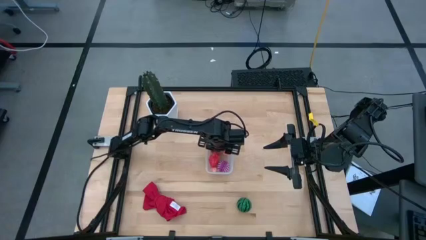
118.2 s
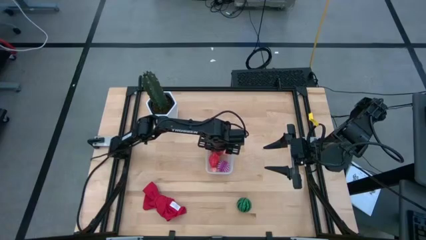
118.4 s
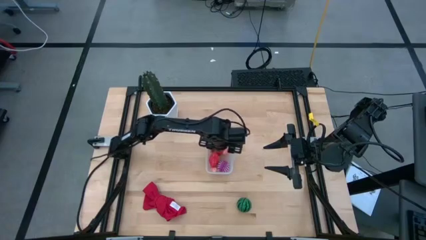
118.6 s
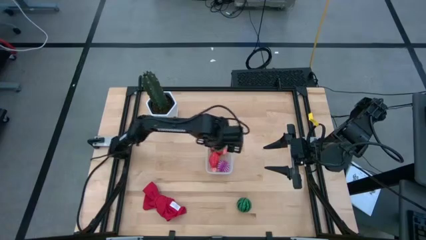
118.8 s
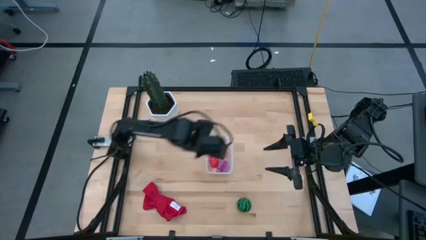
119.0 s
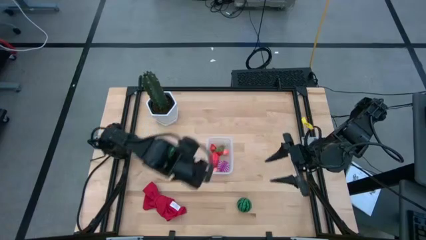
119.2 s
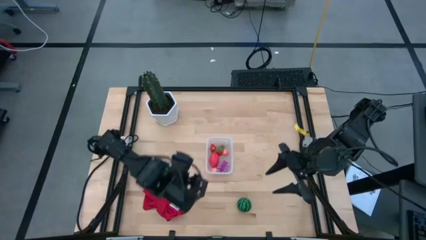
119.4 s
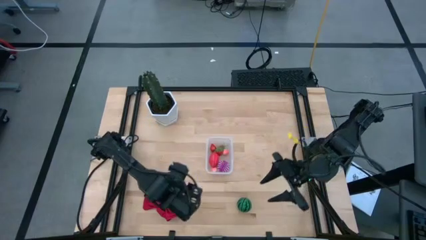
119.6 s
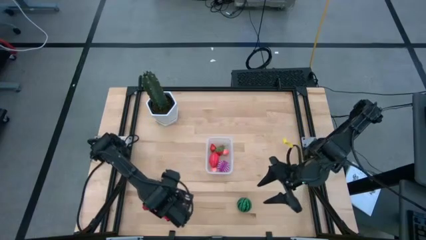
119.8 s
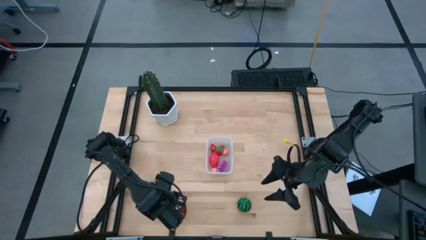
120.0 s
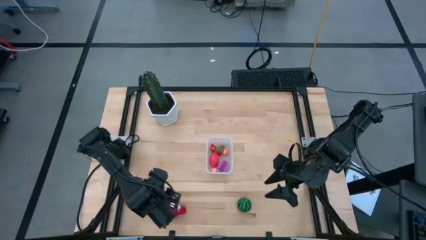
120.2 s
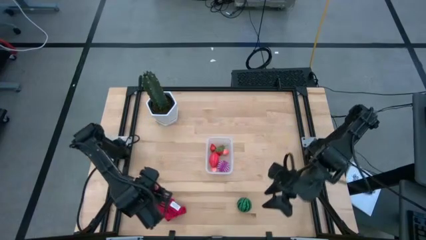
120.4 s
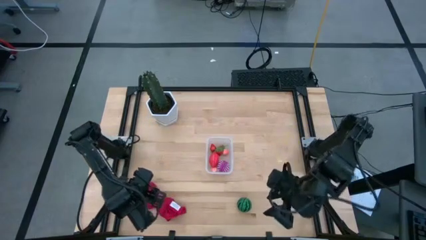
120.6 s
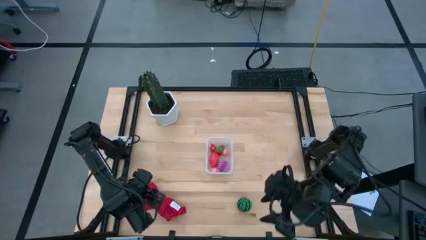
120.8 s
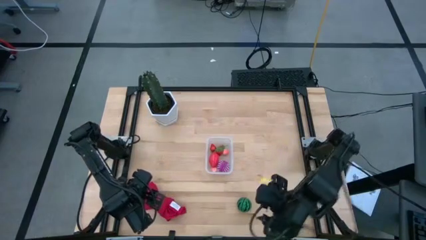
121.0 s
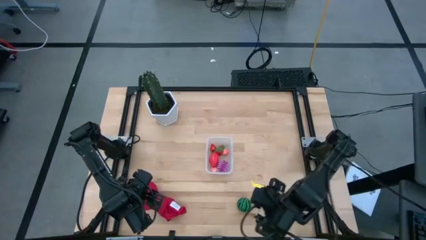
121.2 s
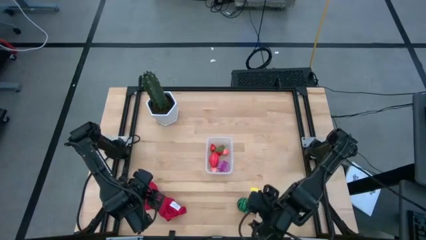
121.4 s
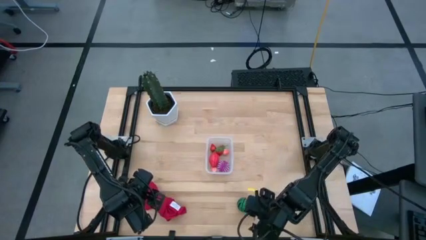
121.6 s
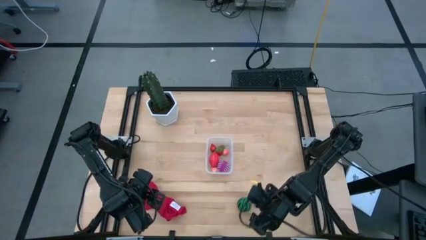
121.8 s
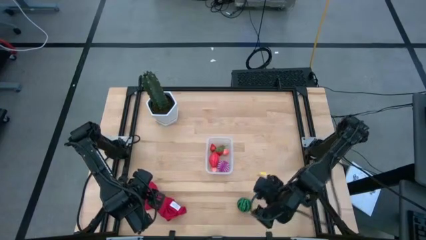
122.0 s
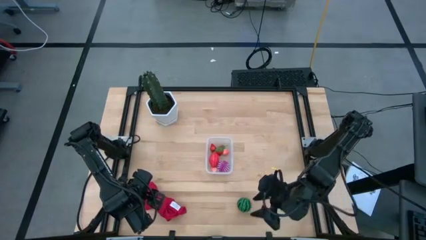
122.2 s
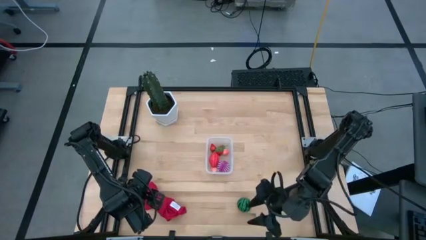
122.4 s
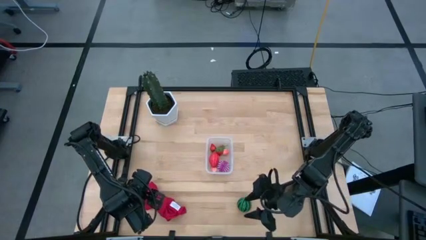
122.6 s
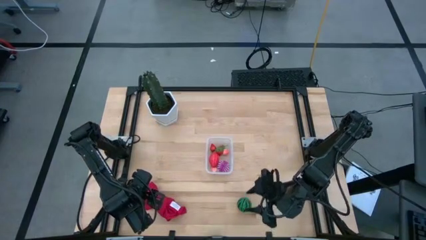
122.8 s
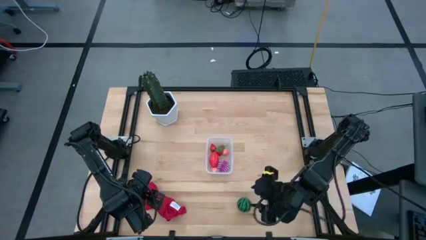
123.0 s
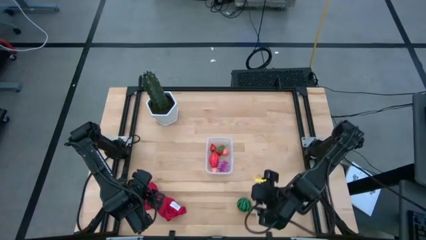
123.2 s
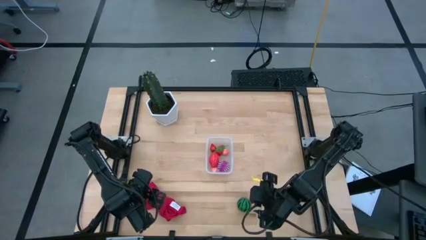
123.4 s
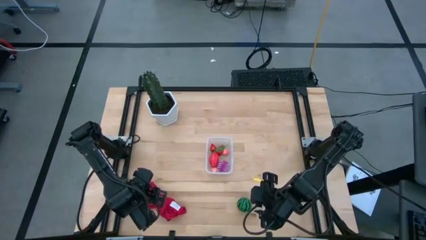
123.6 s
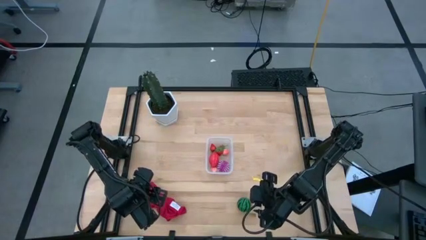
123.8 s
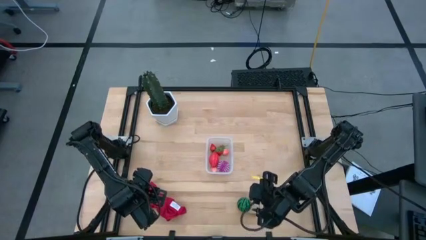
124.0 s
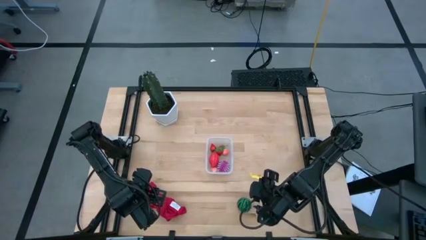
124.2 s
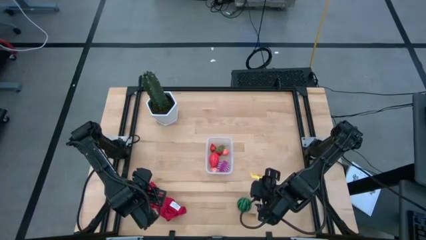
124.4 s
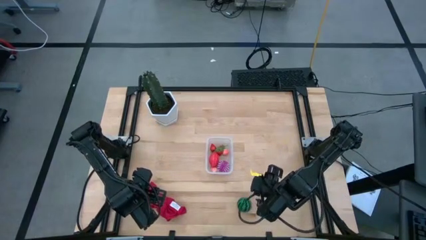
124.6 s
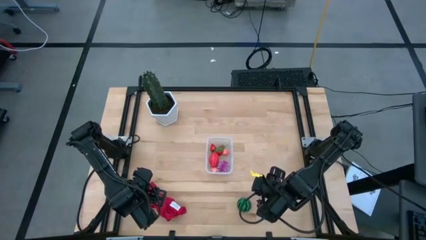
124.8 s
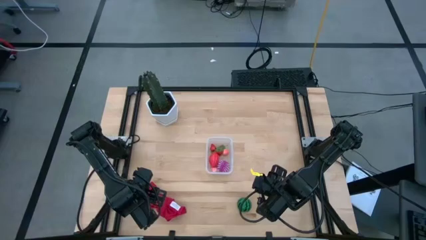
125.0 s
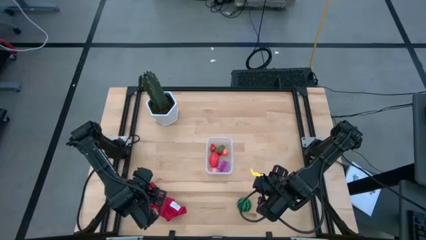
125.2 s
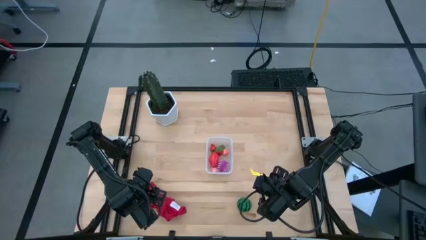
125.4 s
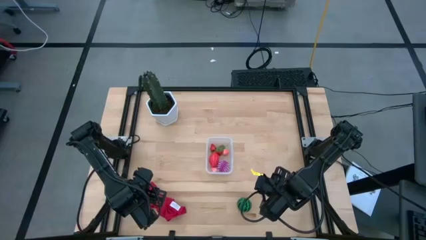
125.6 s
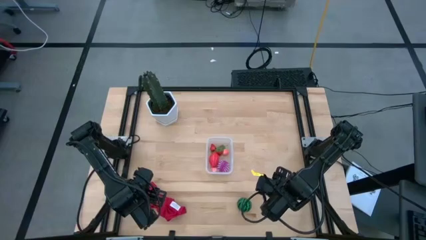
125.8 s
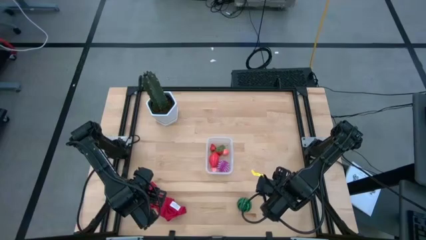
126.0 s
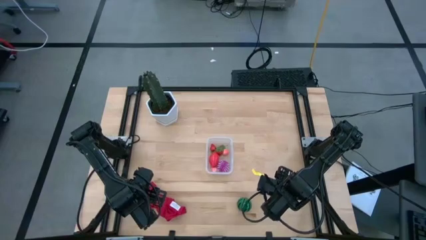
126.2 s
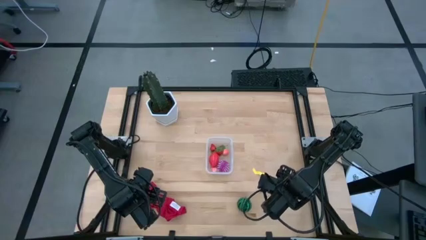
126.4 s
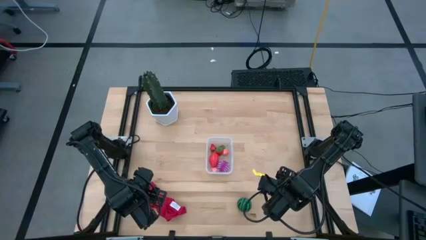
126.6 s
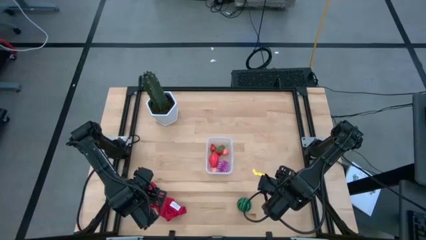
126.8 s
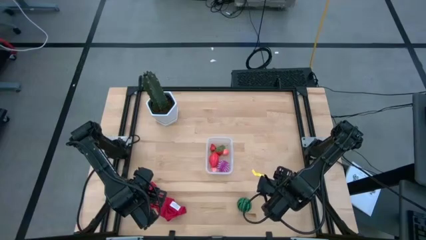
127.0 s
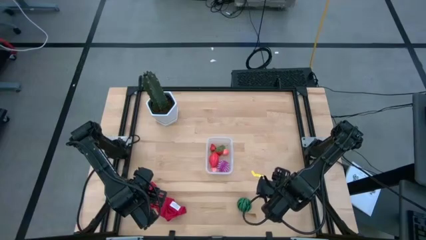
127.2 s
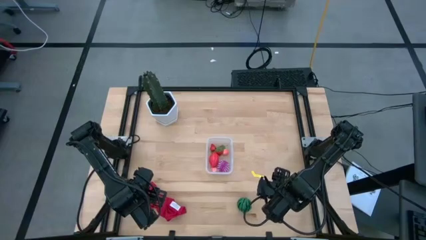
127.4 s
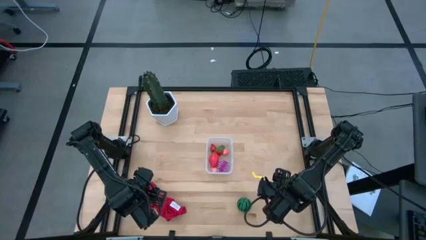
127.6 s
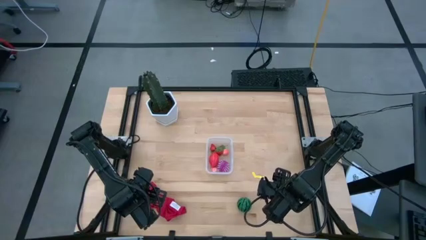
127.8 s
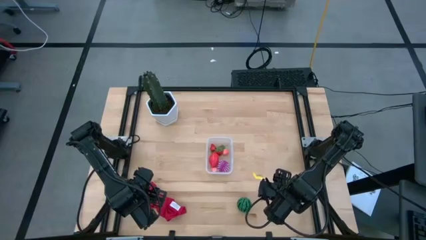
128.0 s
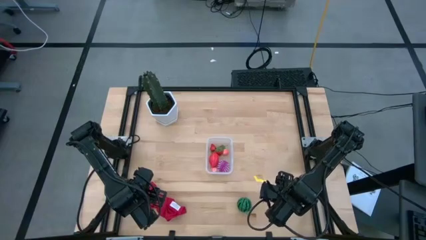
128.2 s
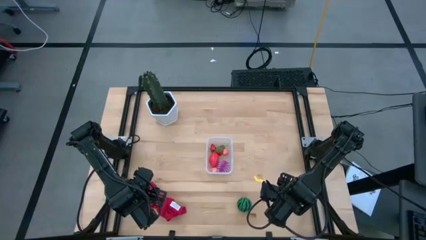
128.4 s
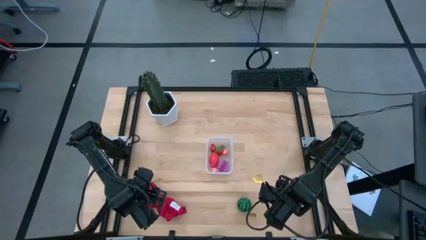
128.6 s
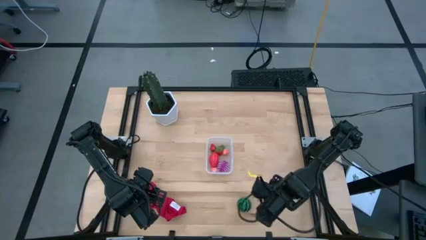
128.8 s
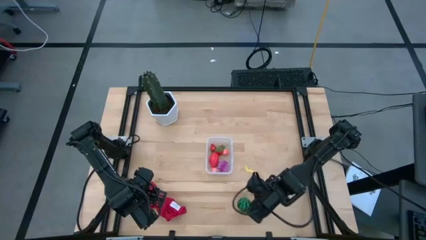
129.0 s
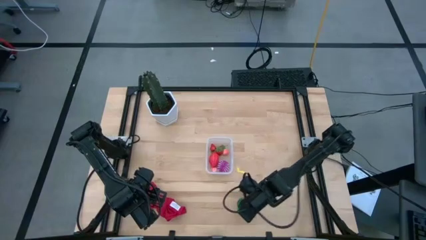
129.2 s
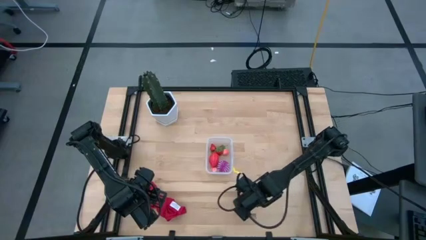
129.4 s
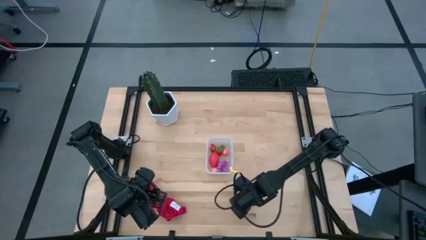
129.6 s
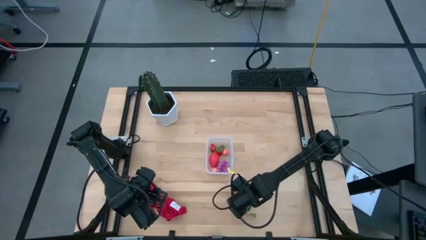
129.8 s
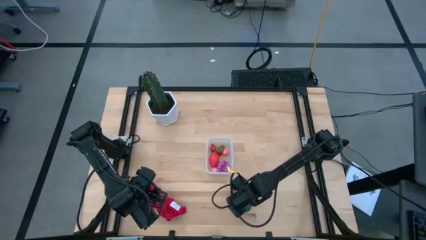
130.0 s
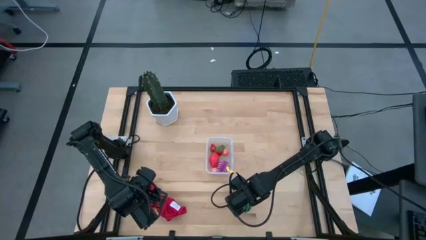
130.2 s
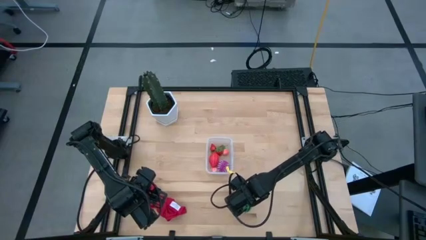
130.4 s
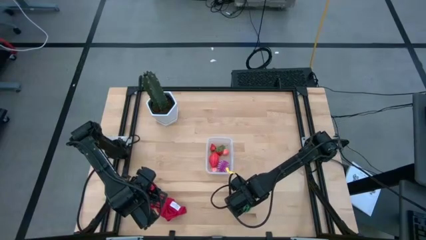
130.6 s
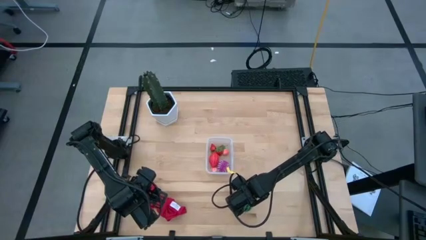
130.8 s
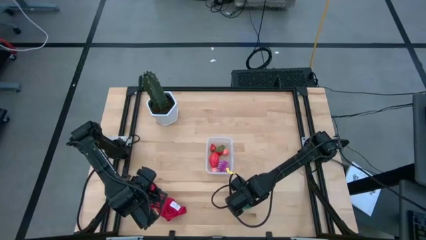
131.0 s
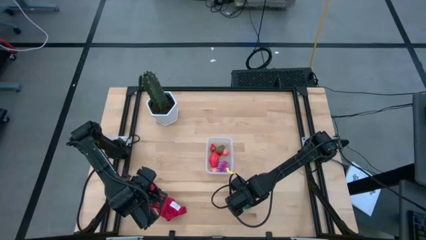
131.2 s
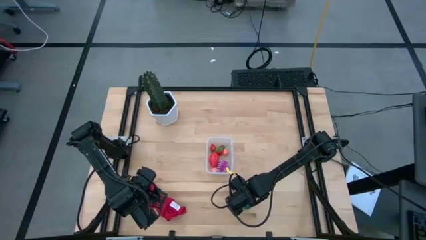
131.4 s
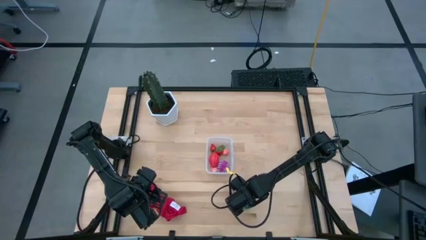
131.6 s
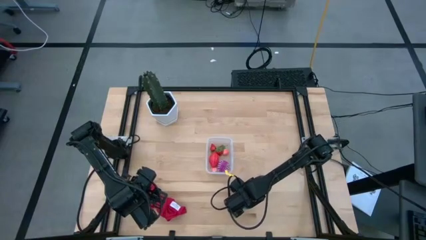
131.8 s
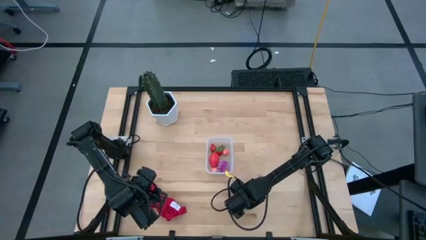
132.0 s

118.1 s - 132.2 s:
Task: Pick and placing Produce into tupperware
Put the green watermelon into the transparent bin

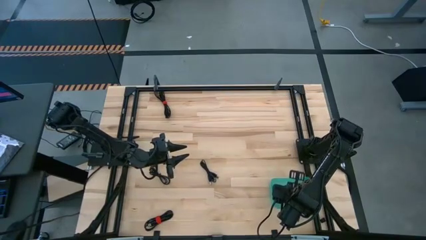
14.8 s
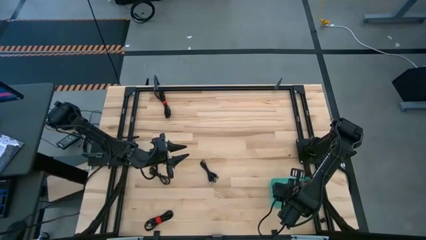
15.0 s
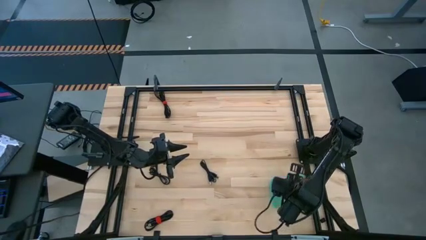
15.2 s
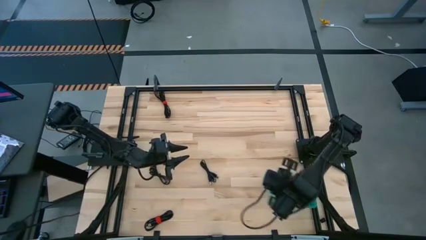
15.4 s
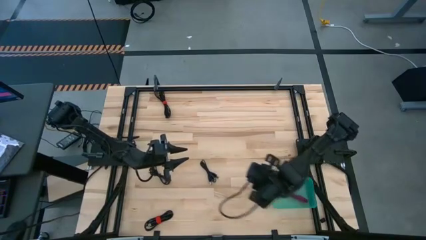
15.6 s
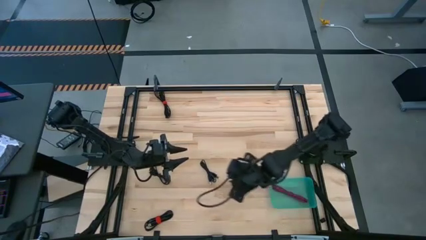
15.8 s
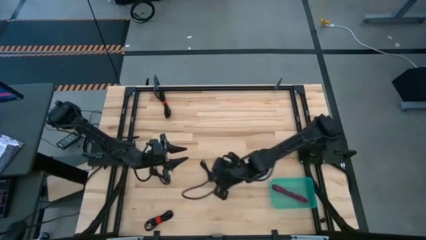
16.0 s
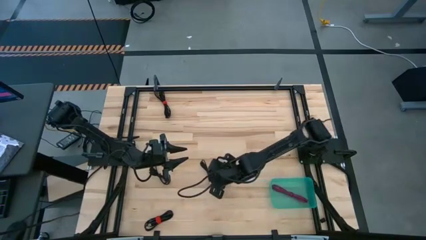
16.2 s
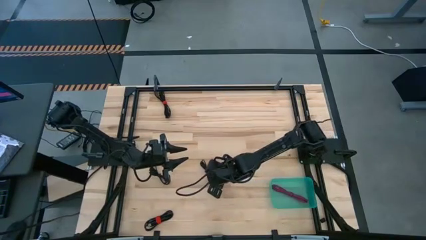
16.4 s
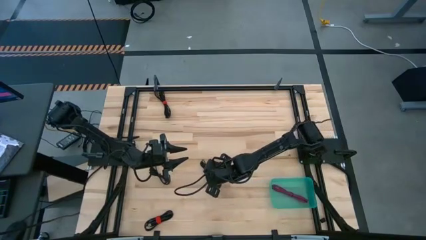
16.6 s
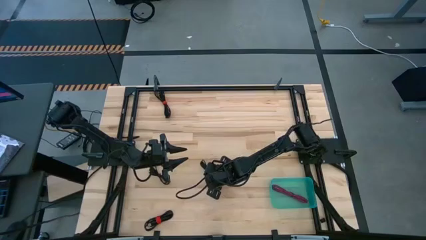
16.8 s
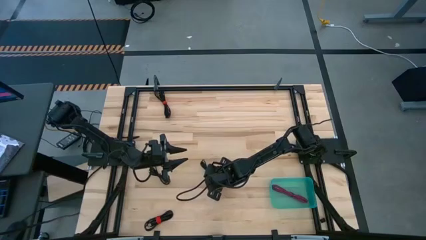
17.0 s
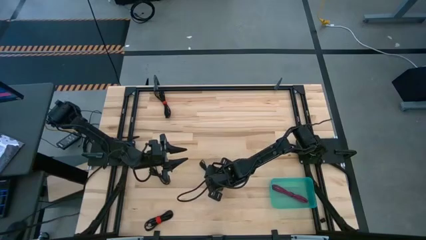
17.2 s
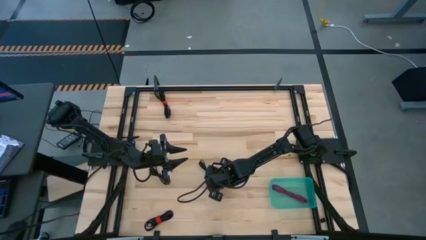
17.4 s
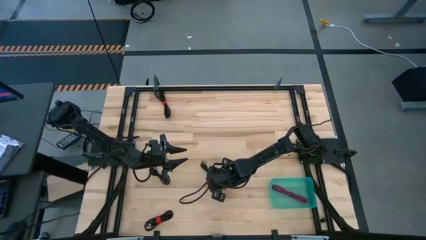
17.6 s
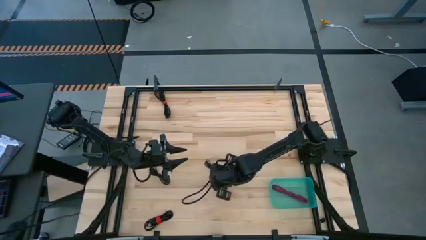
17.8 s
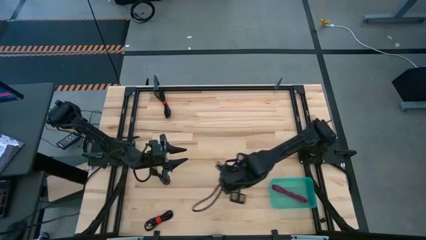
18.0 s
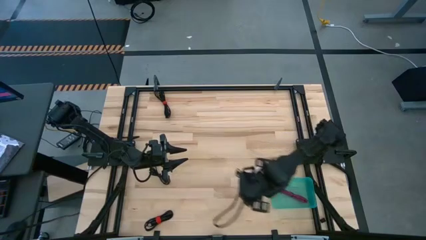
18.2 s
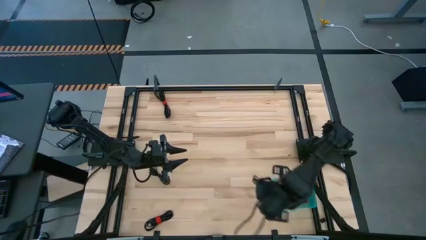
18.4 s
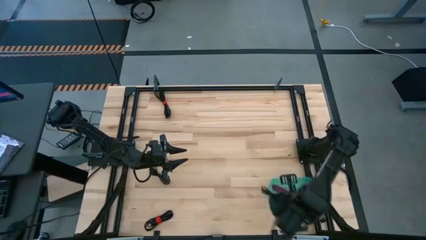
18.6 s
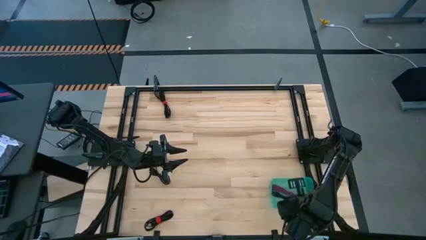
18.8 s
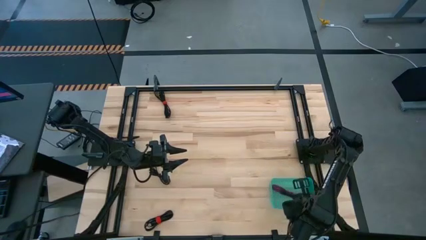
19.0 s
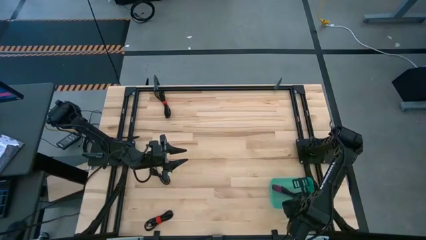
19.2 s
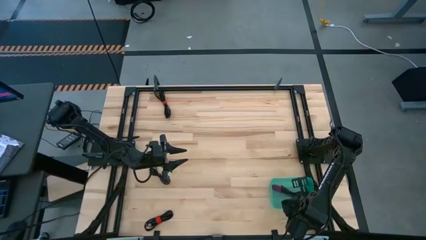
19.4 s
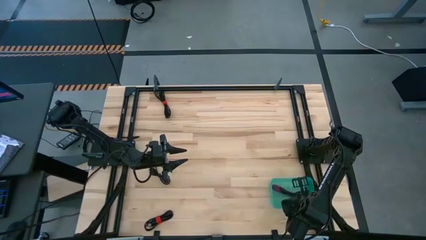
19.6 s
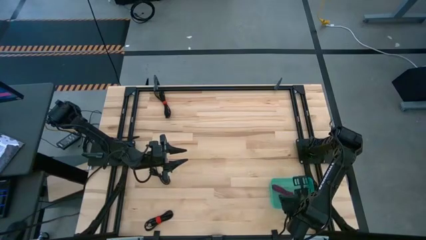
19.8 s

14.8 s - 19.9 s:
Task: Pick and place USB-C Cables
Put the black charger cable into green bin
